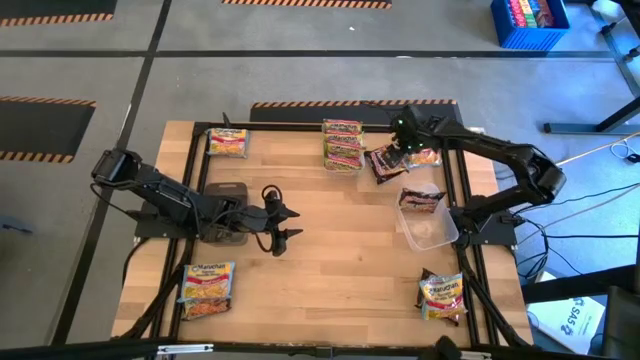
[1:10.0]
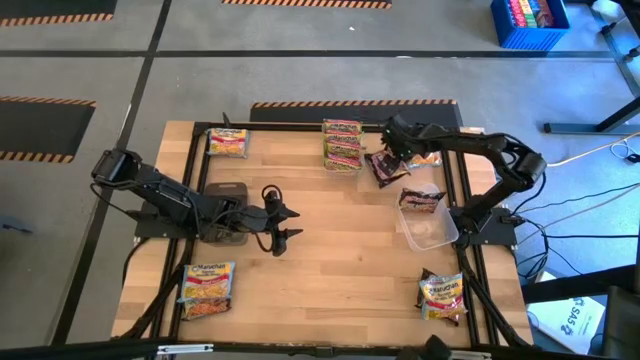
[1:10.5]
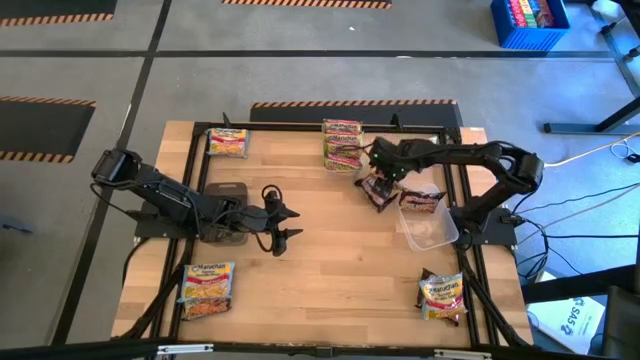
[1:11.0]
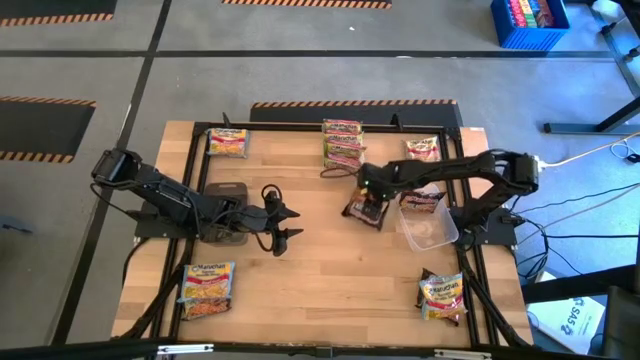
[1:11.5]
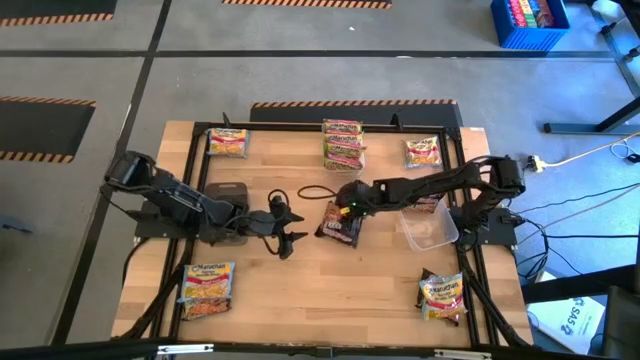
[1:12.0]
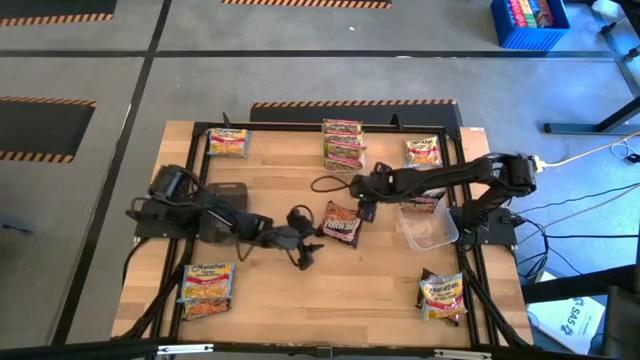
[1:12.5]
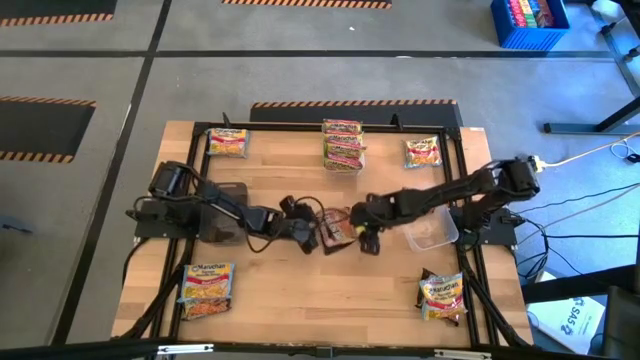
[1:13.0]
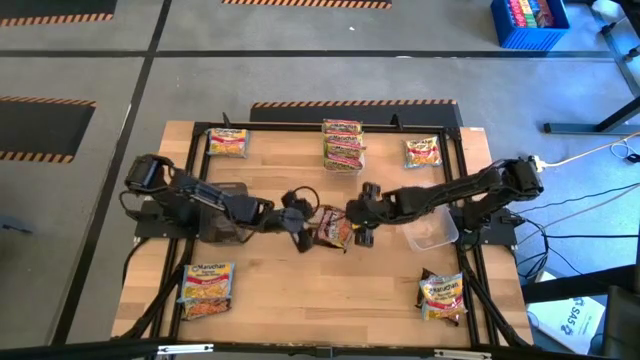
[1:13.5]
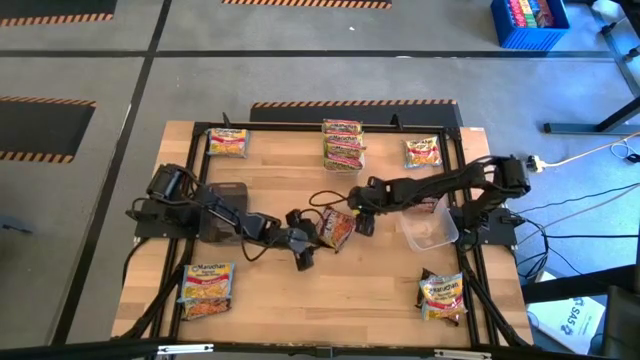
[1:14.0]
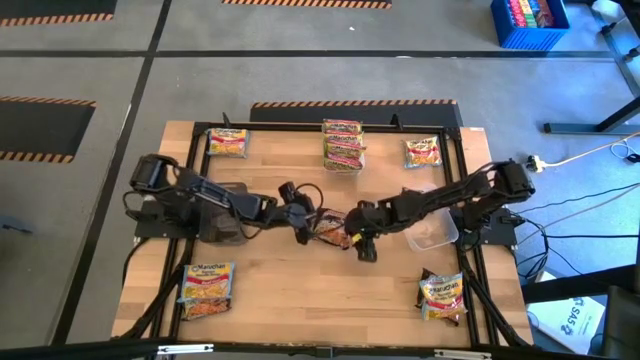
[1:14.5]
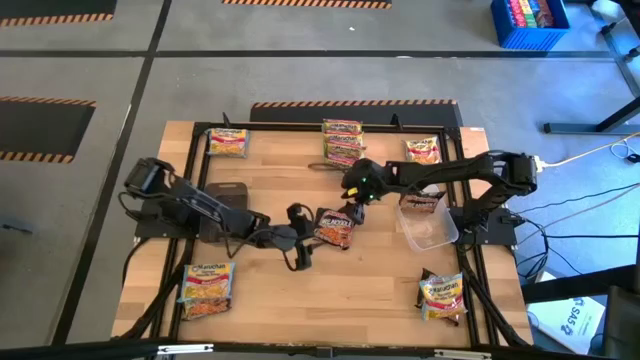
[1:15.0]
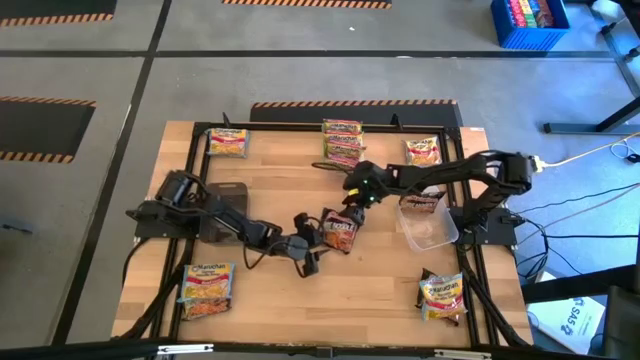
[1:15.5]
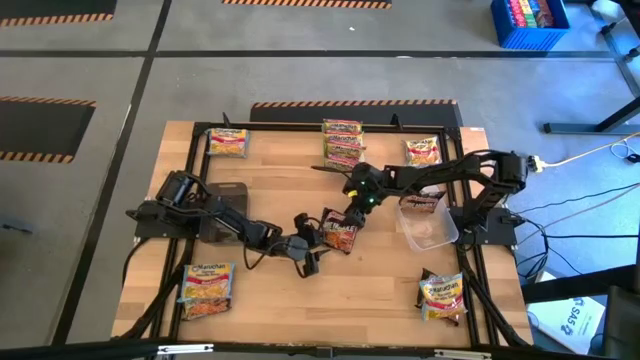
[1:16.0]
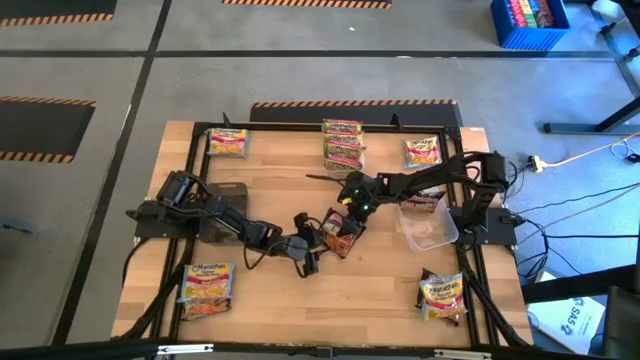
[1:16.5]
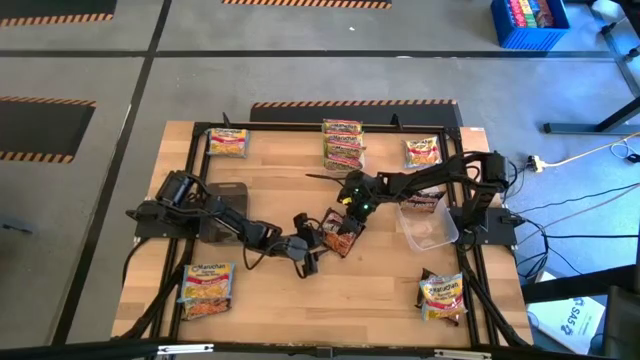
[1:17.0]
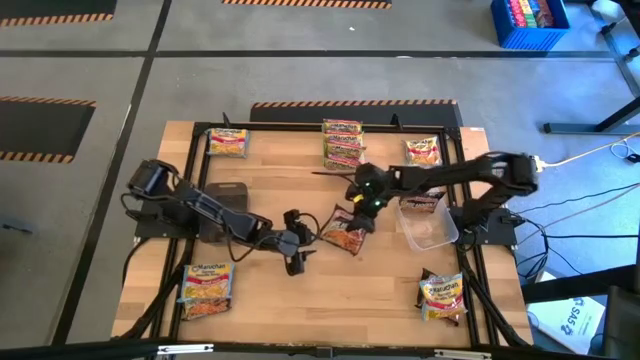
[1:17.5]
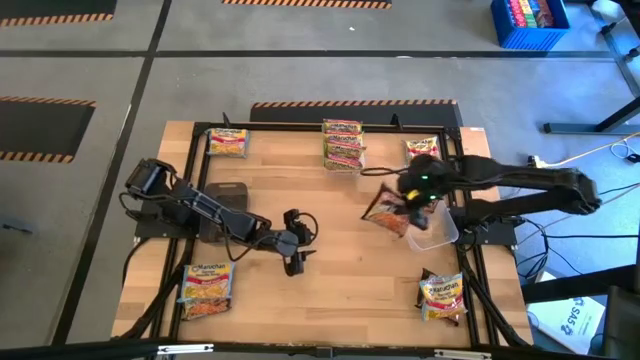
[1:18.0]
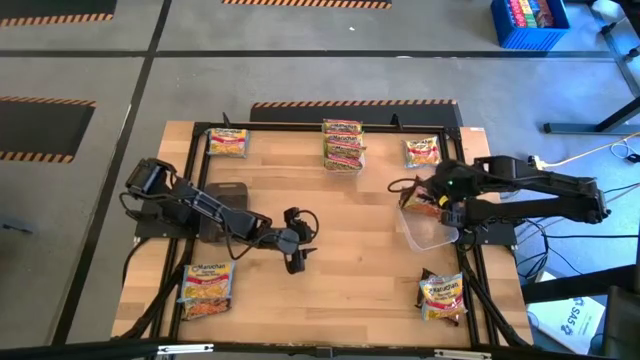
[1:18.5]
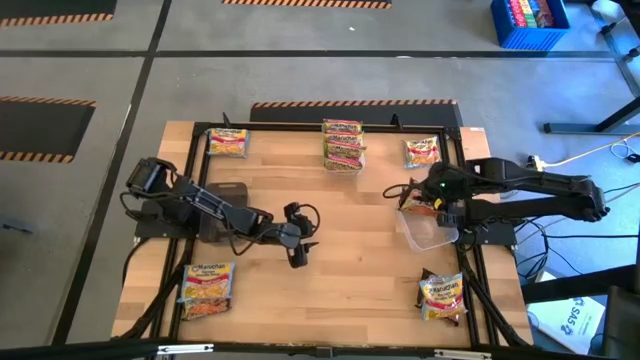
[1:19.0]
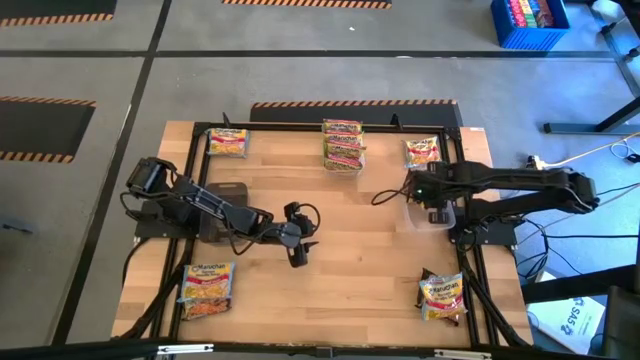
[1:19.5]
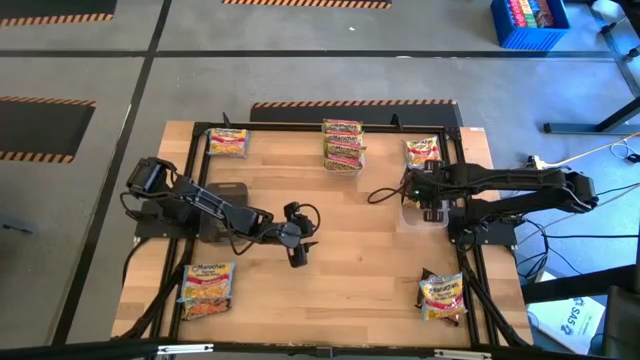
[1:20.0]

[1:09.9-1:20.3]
Task: Sort Maruchan noodles
Put the top black noodle pack into the bottom transparent bin

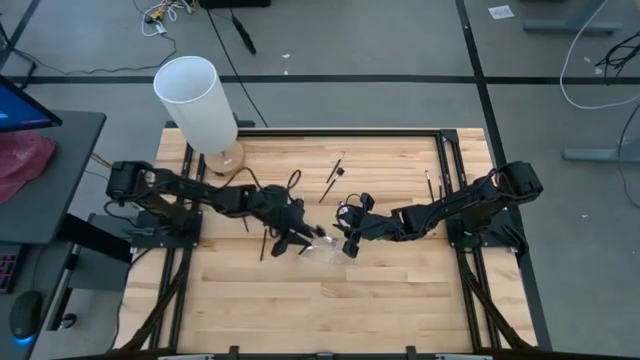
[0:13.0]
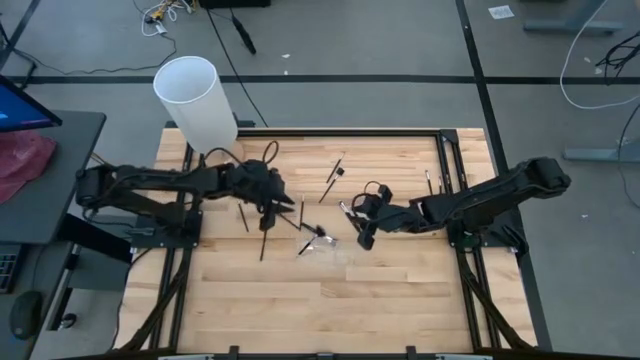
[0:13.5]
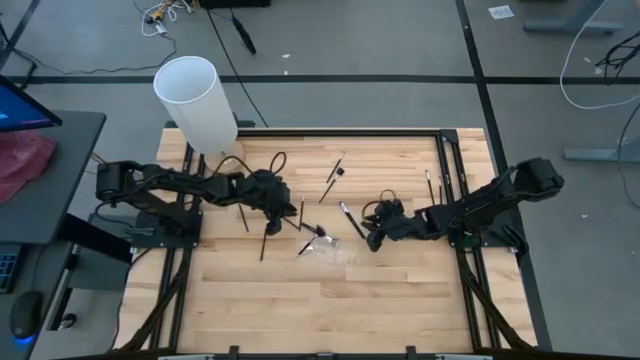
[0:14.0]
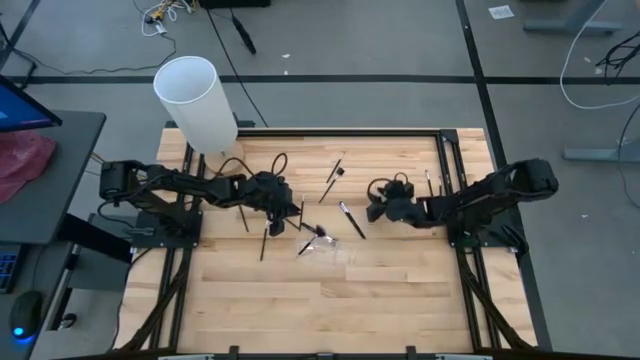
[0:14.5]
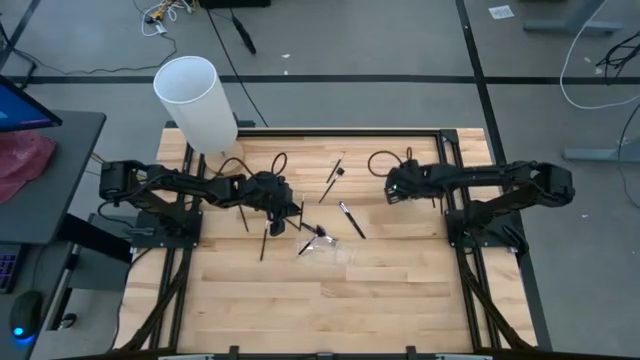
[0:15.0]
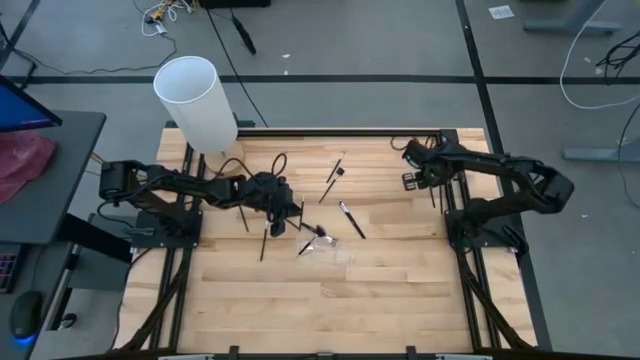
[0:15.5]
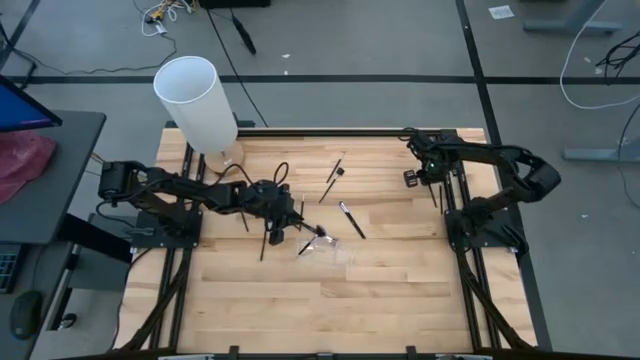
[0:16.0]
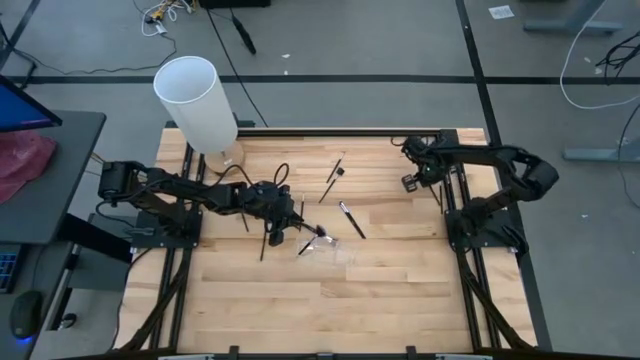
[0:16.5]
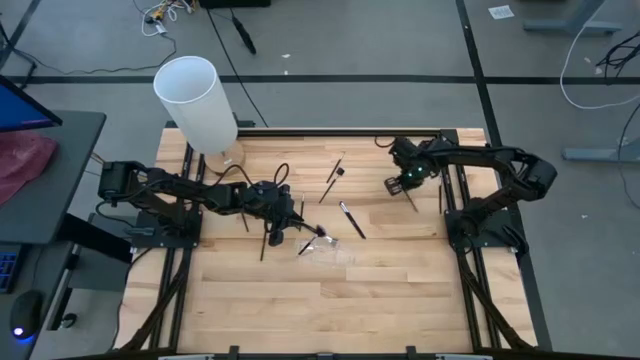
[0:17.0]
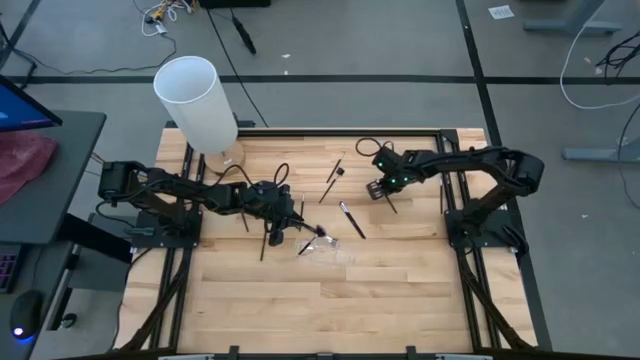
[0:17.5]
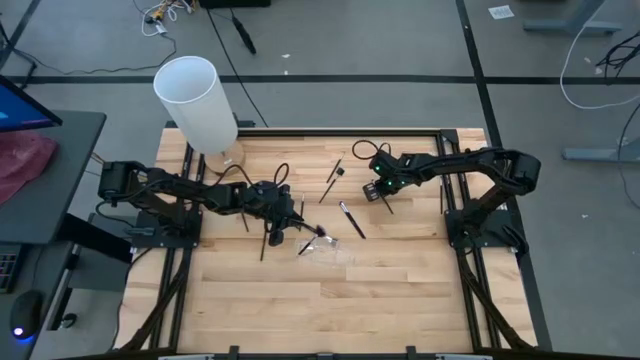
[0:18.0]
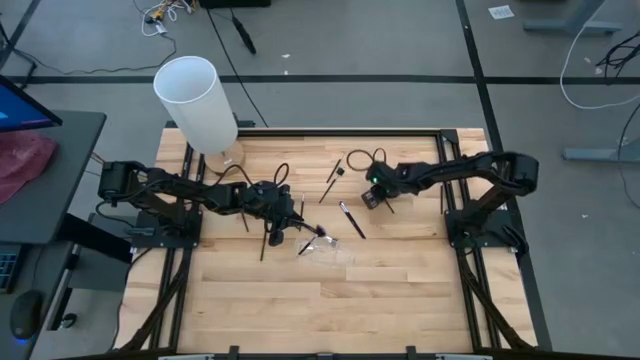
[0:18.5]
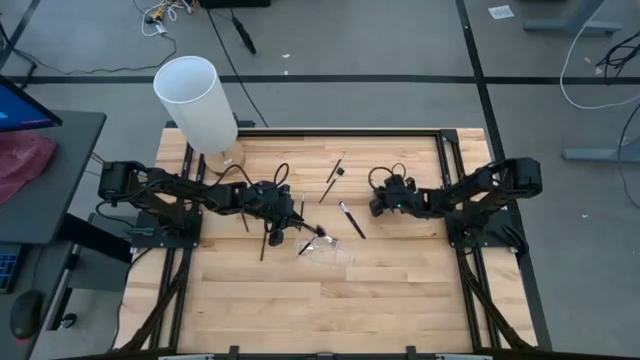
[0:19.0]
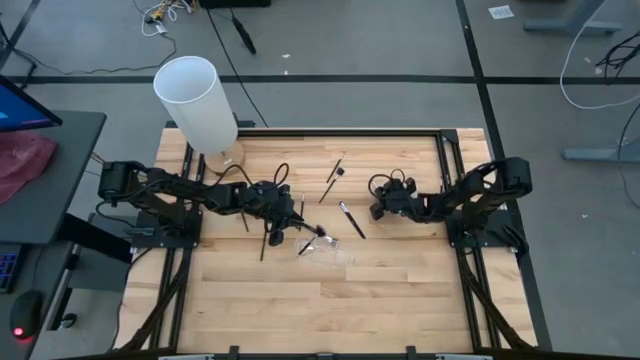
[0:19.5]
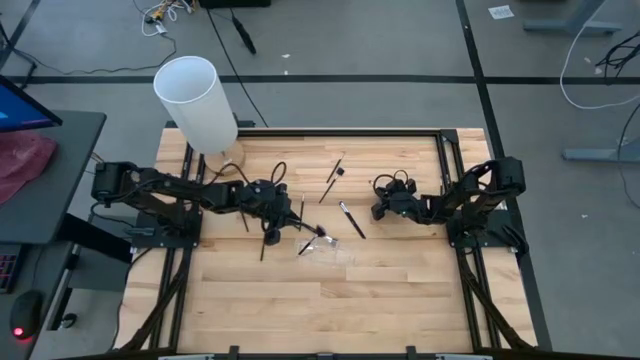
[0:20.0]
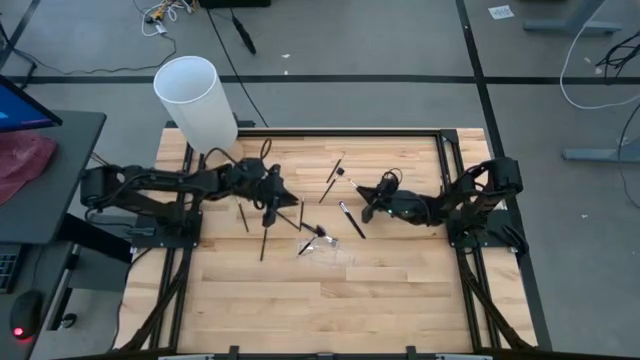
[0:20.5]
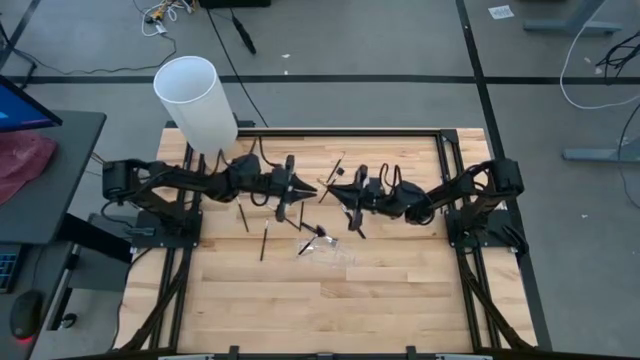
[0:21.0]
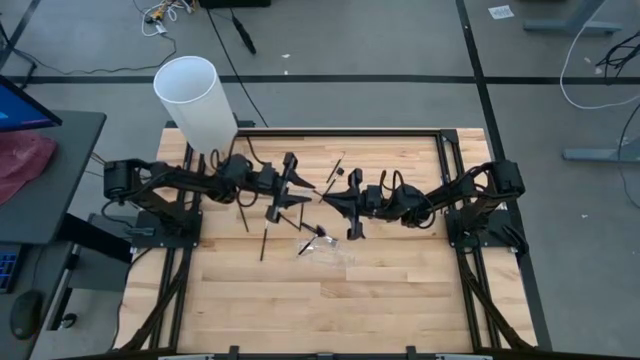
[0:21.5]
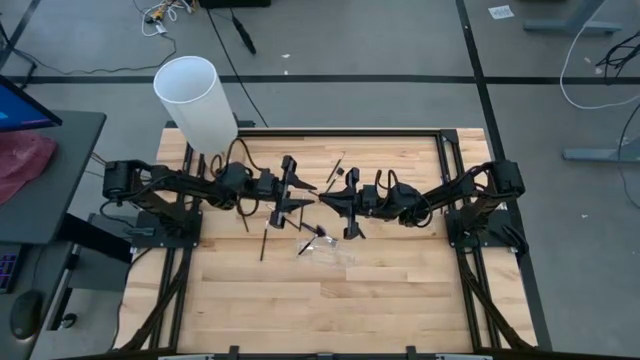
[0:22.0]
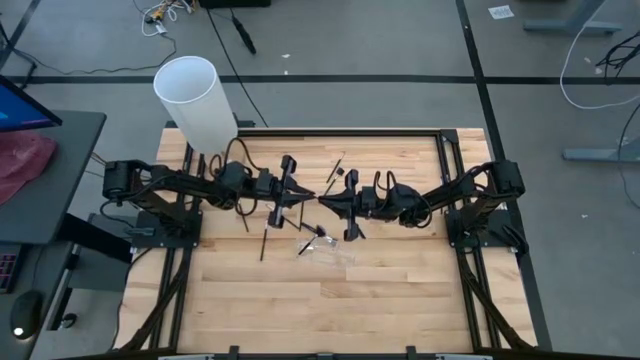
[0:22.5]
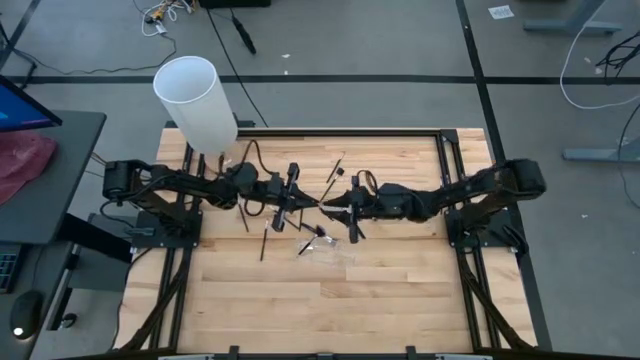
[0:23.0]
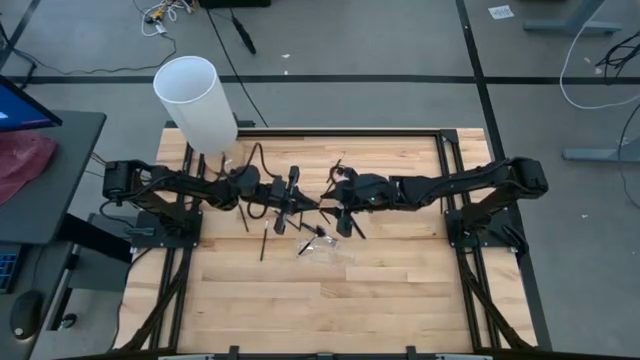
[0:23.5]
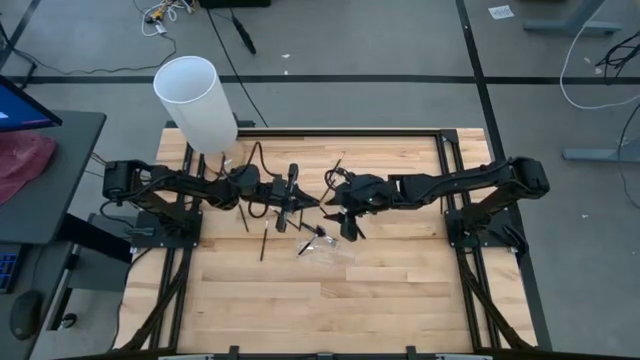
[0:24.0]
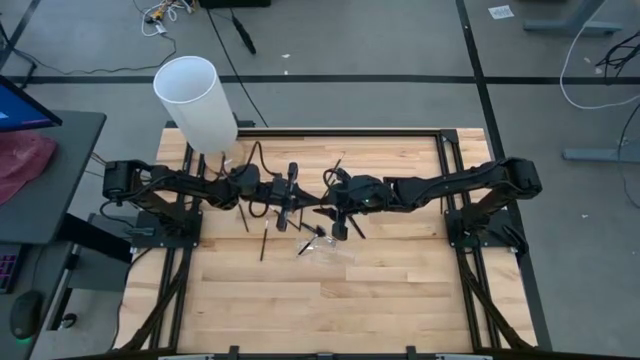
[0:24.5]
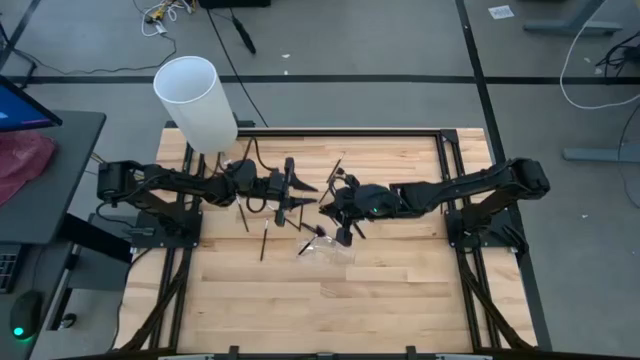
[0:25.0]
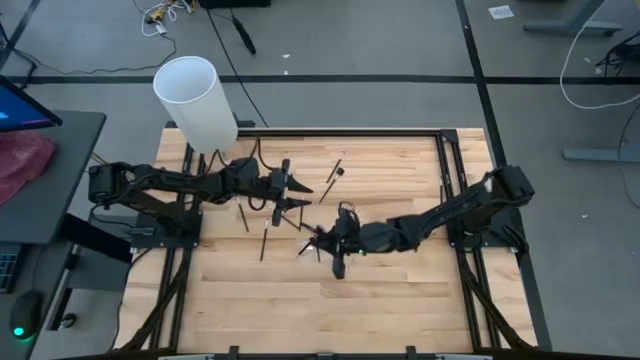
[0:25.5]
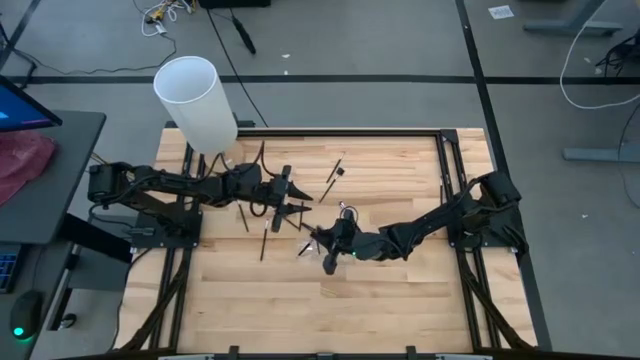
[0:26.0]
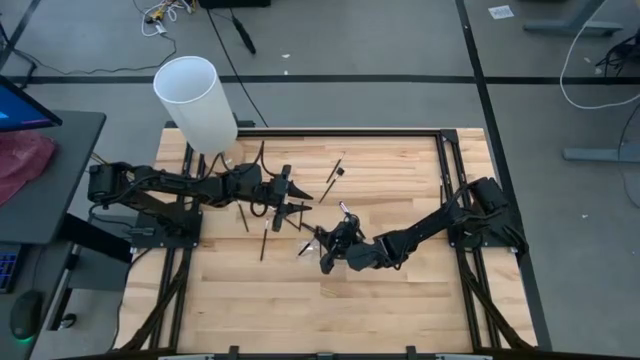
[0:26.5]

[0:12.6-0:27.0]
Task: Put items in baskets/containers
Put the black eyeshadow brush into the transparent organizer
